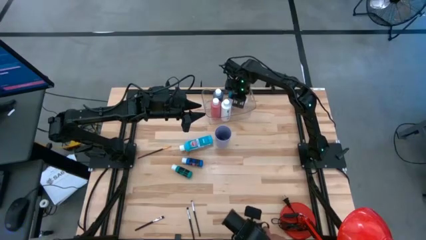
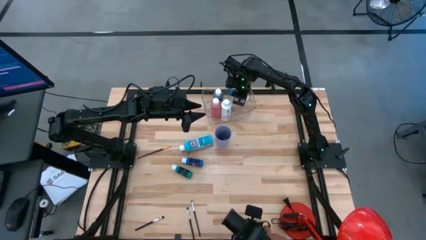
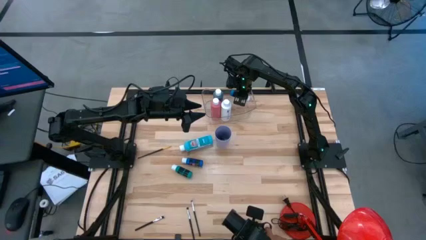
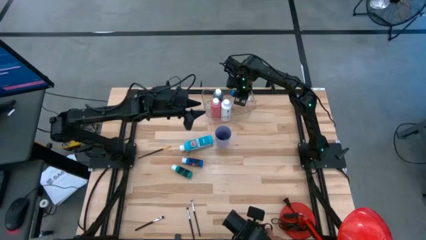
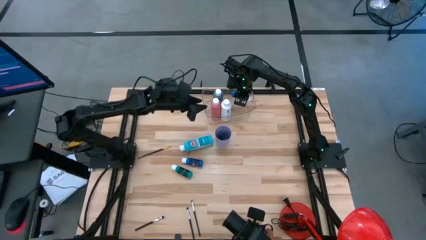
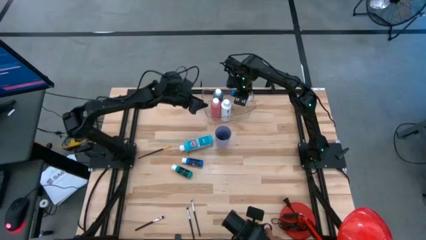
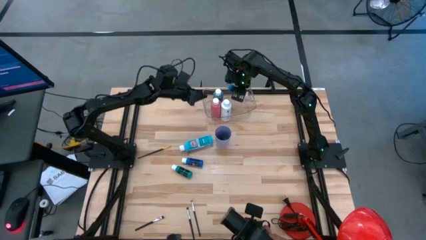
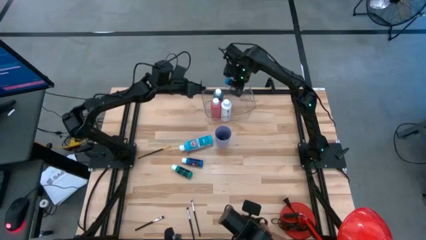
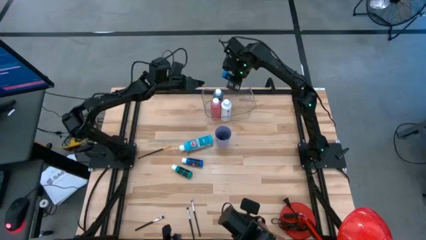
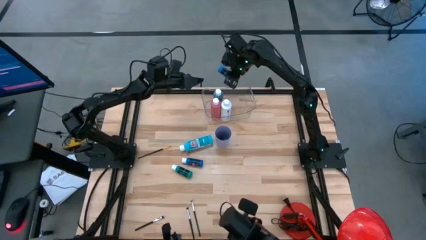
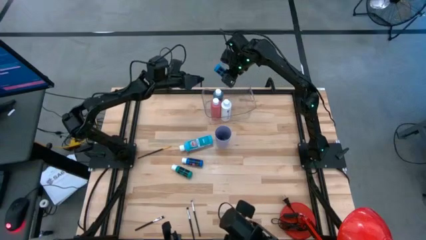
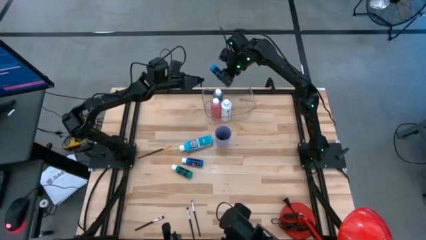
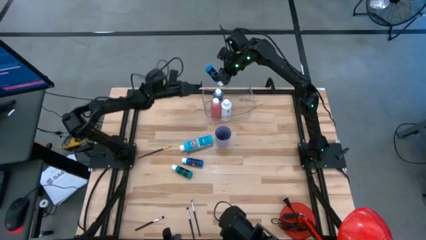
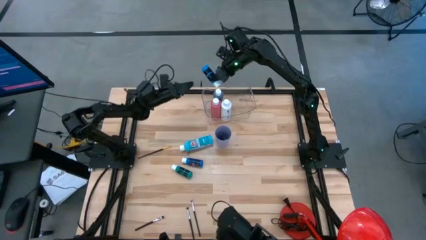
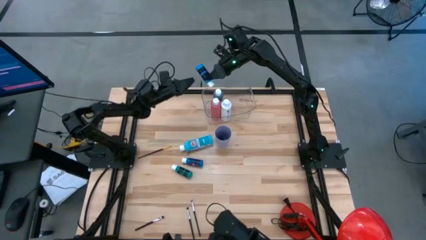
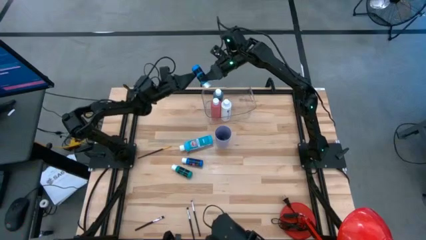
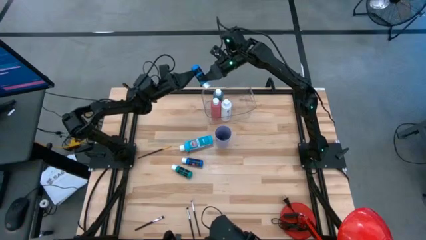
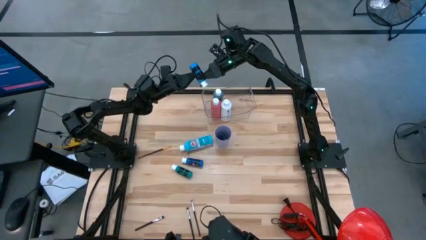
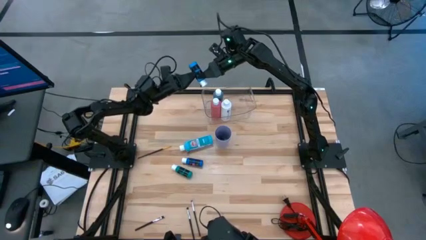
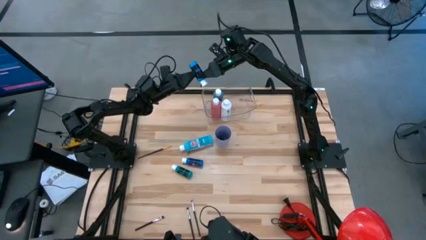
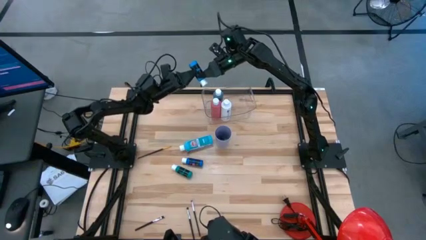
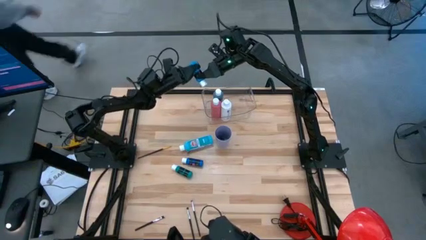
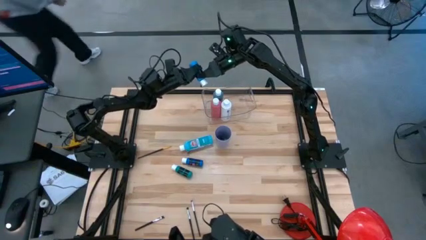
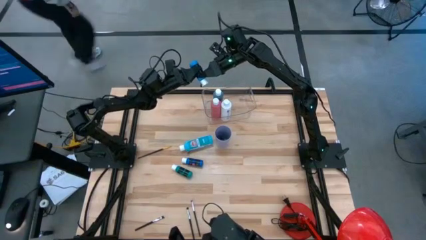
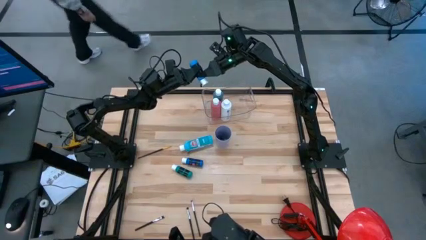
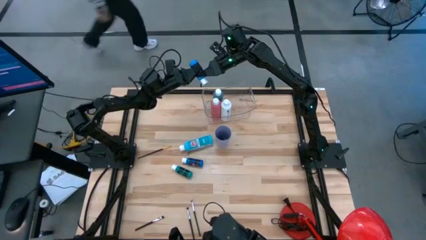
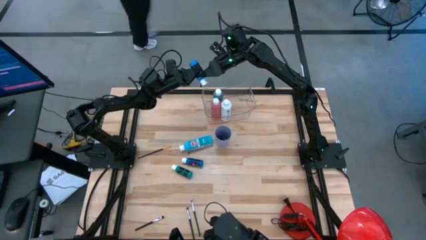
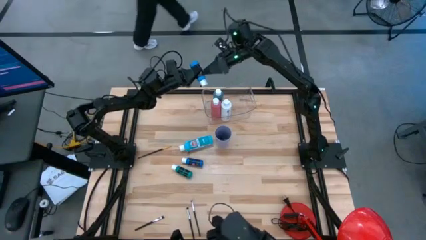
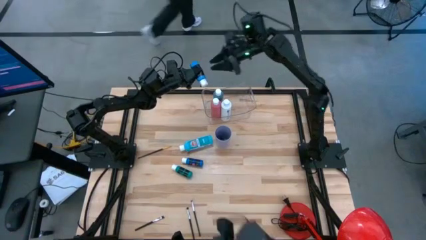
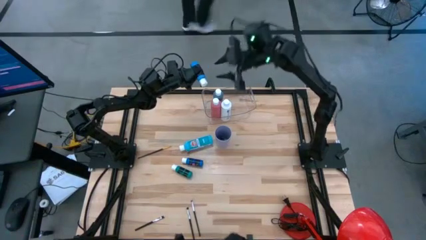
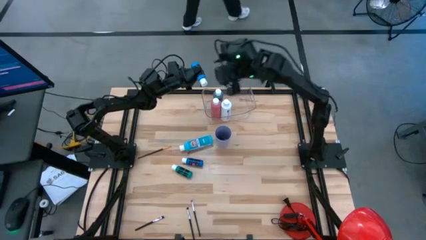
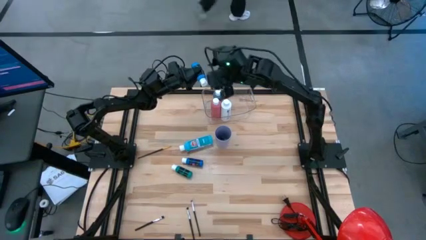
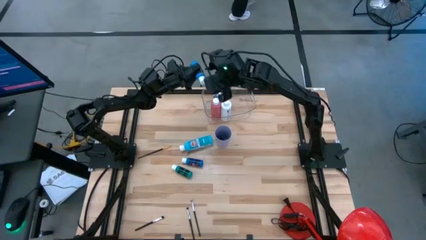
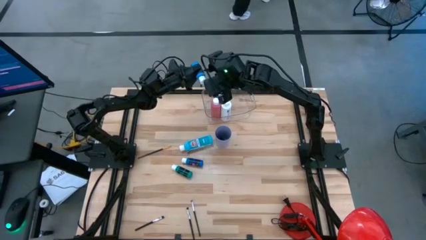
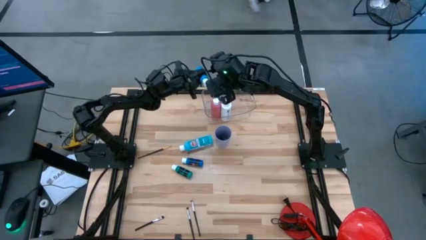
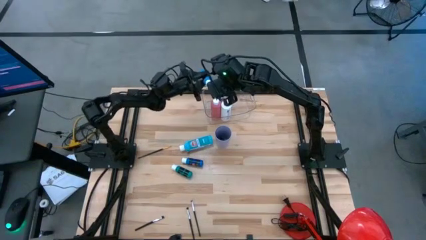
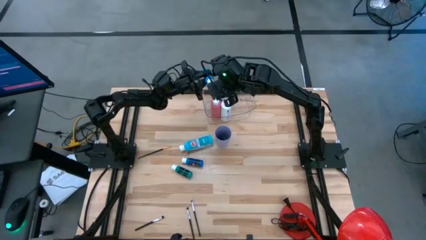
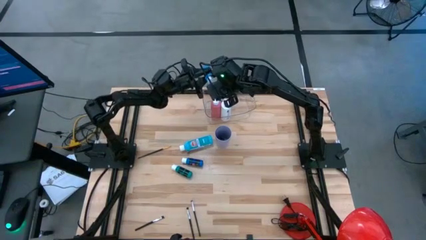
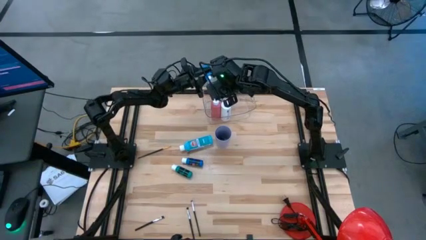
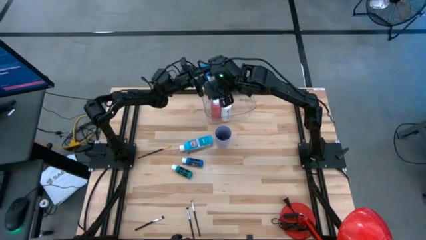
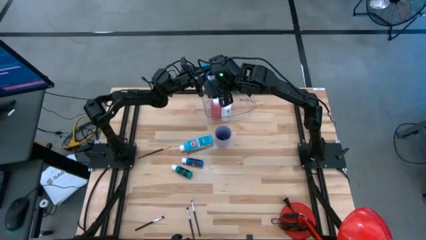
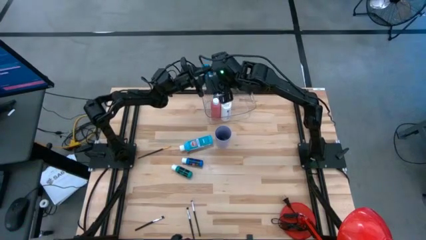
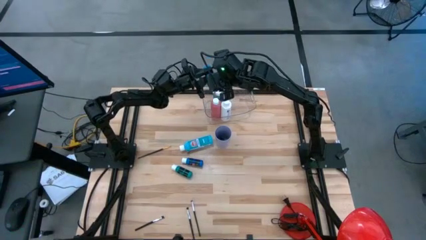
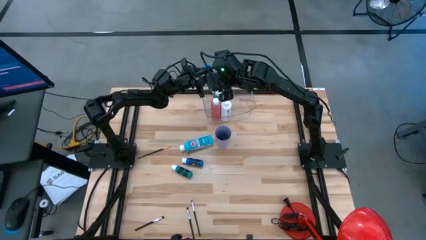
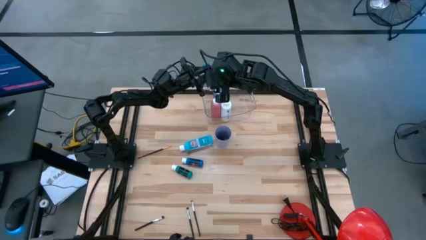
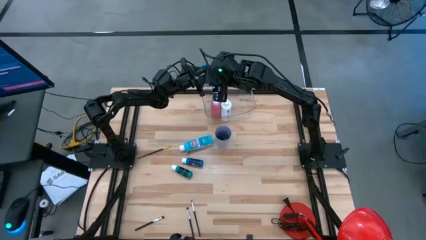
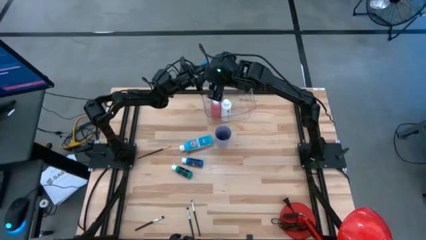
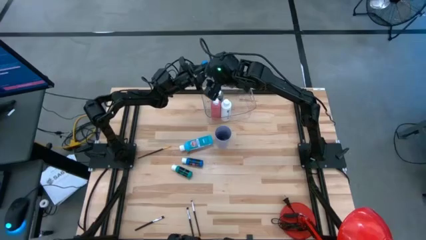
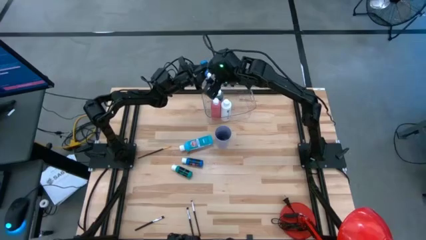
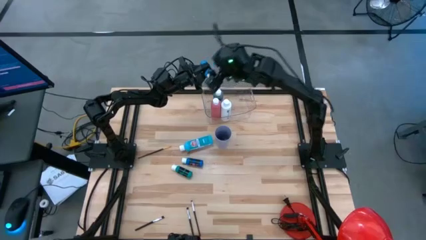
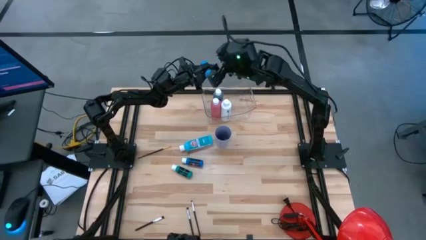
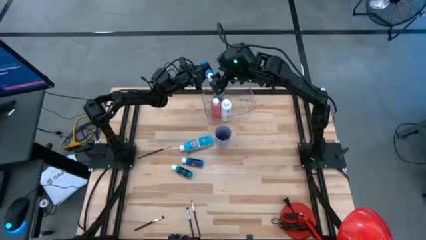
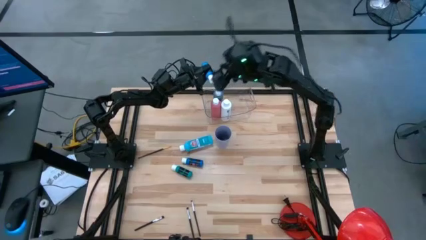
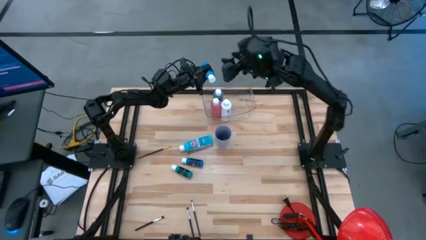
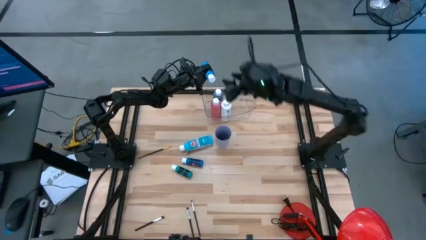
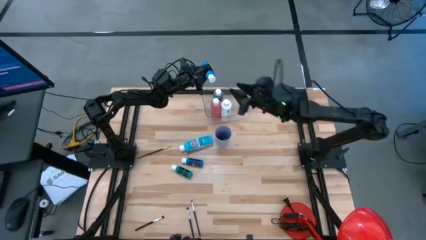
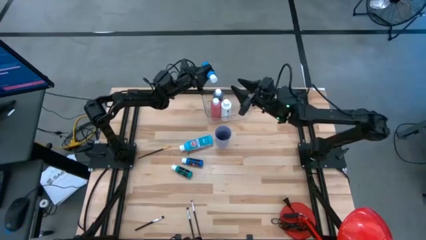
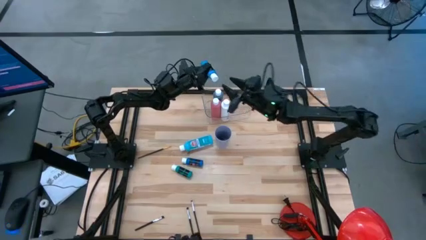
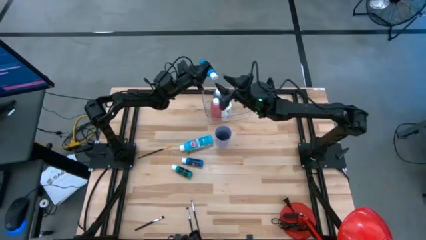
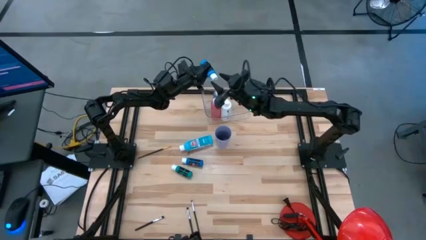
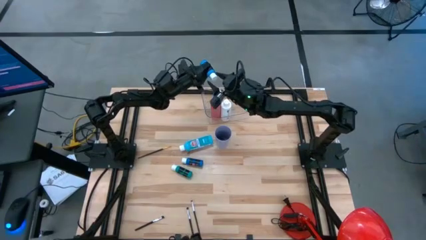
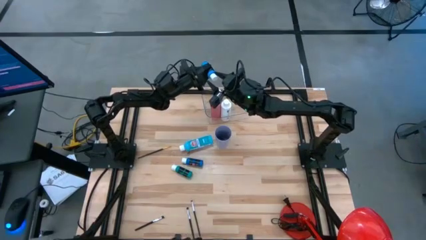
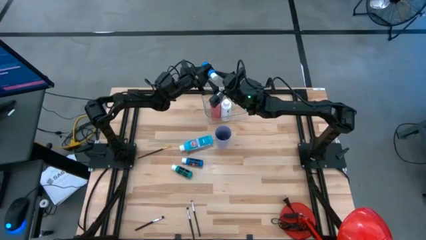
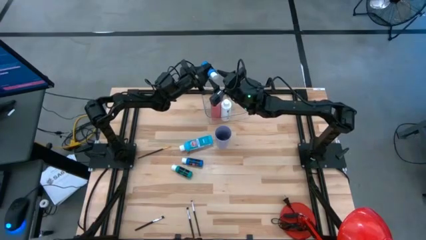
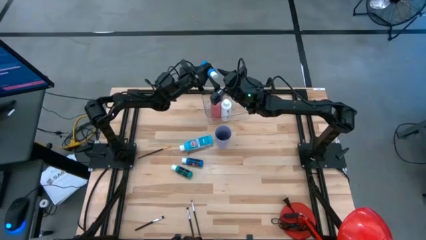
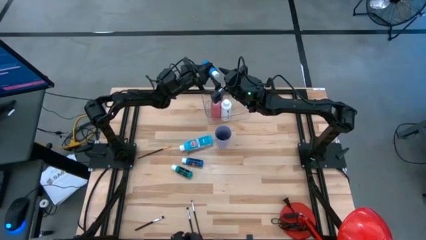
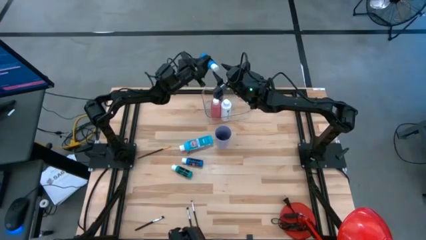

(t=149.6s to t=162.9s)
Task: Pick & Place Paint Supplies
Adjust the blue paint bottle in the transparent bin

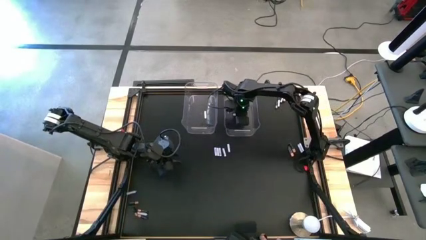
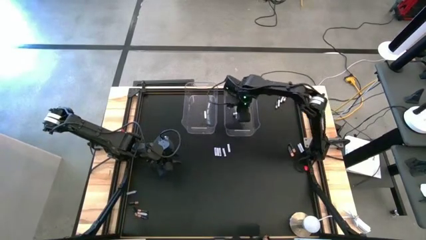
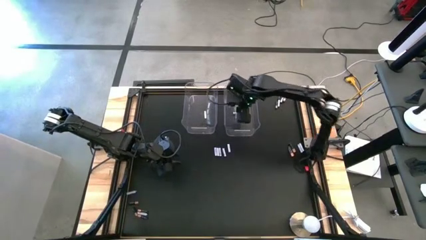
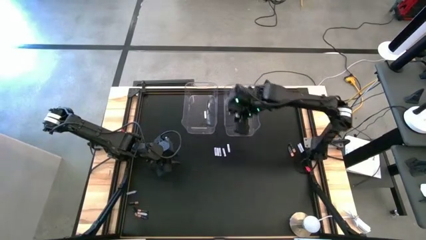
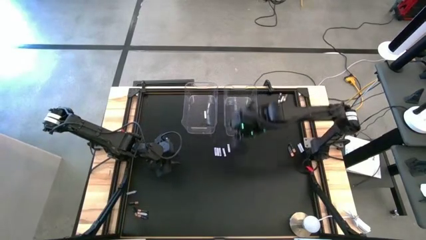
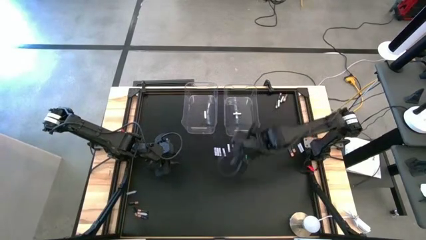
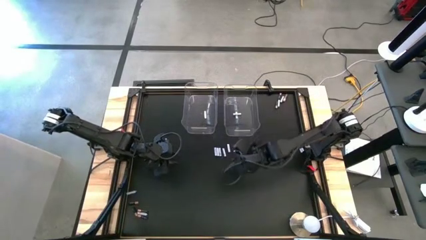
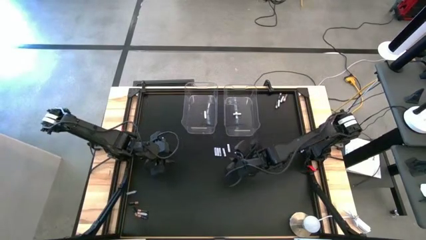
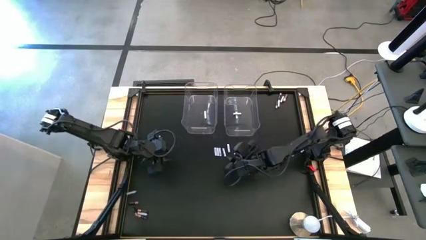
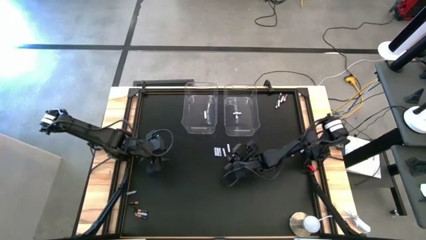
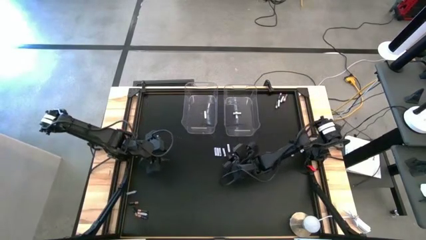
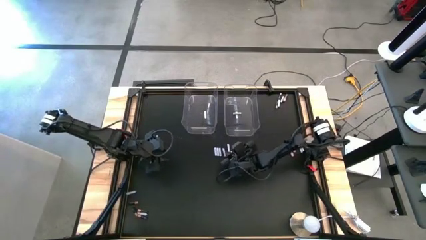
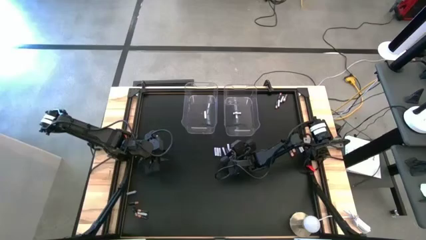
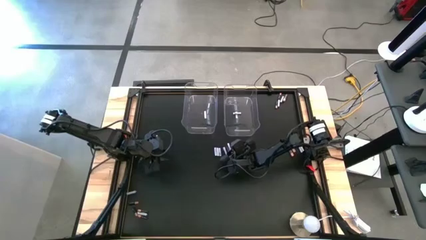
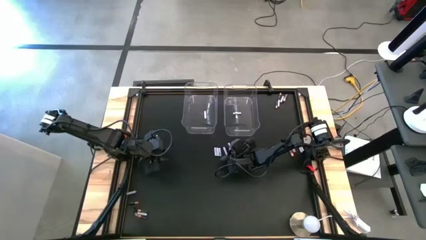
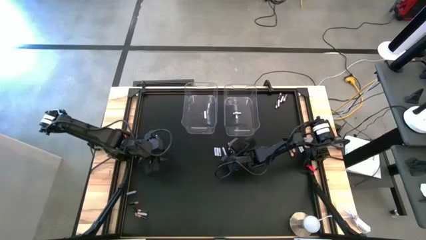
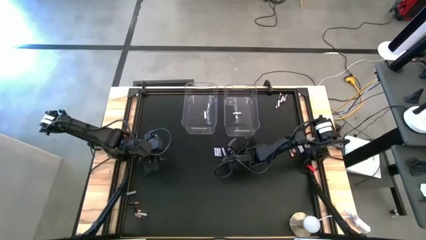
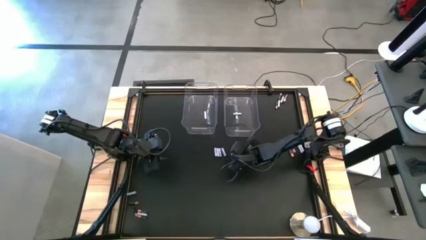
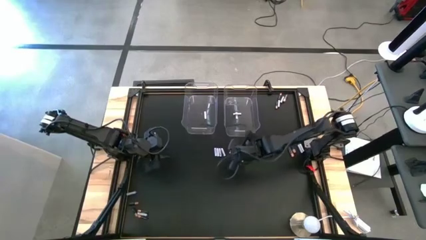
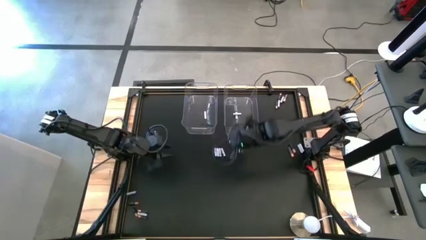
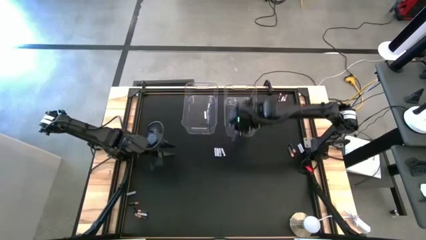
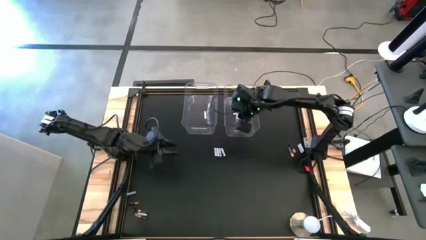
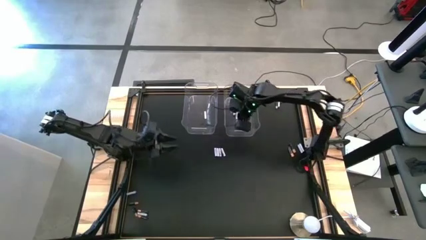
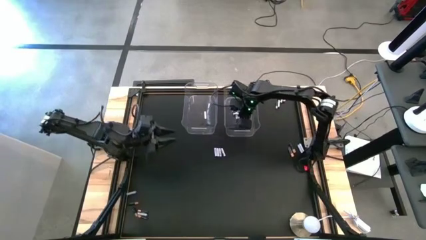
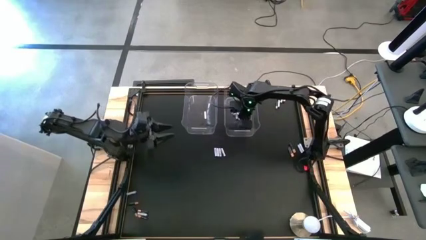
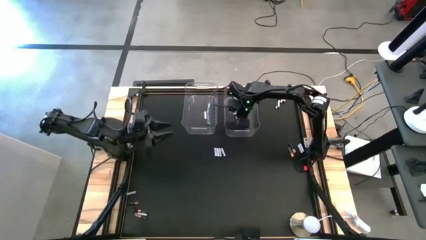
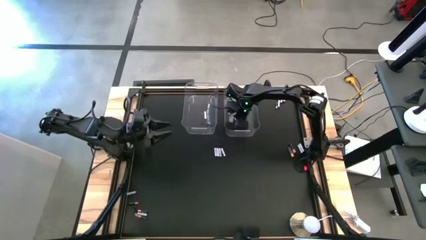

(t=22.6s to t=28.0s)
Task: Sort batteries
Put the white battery into the right transparent bin
